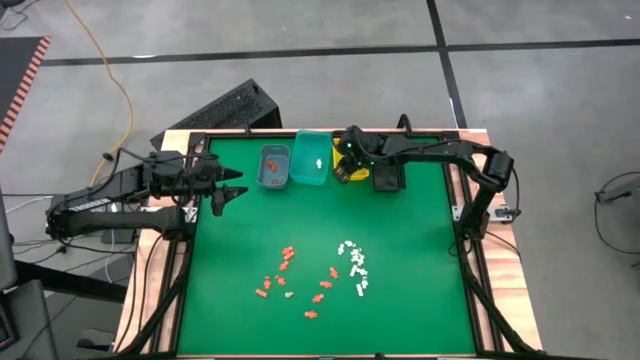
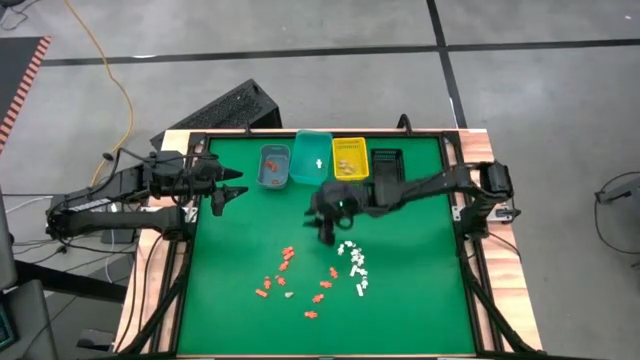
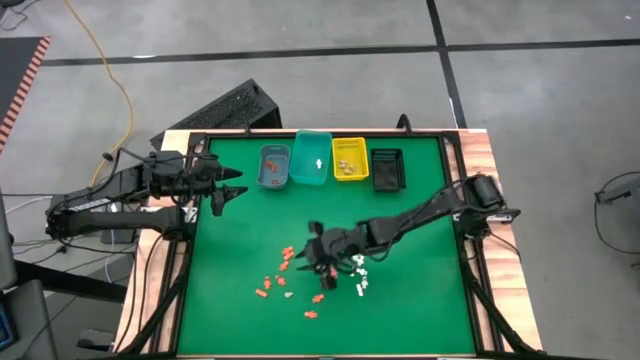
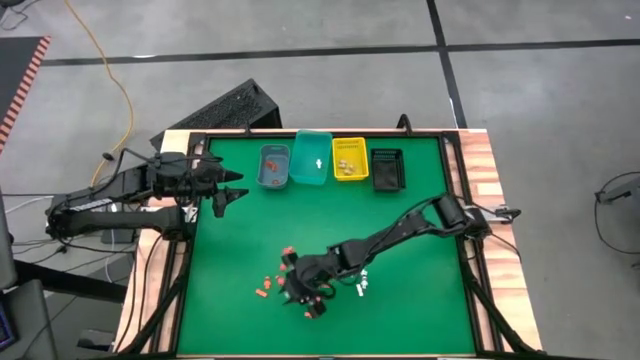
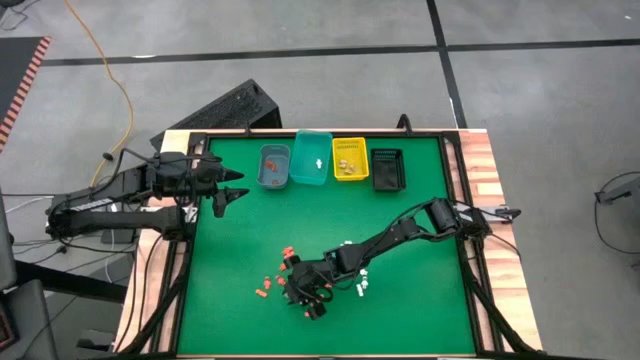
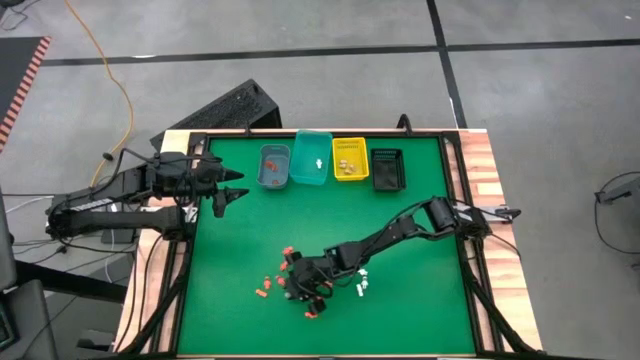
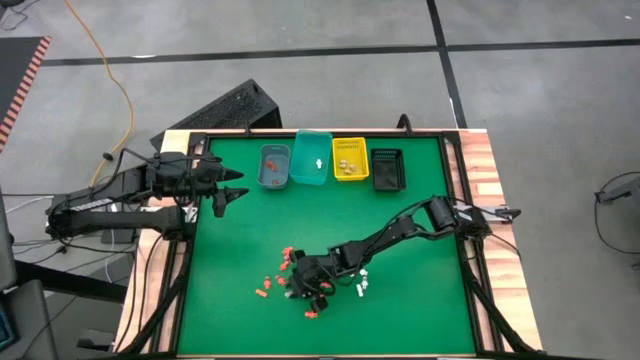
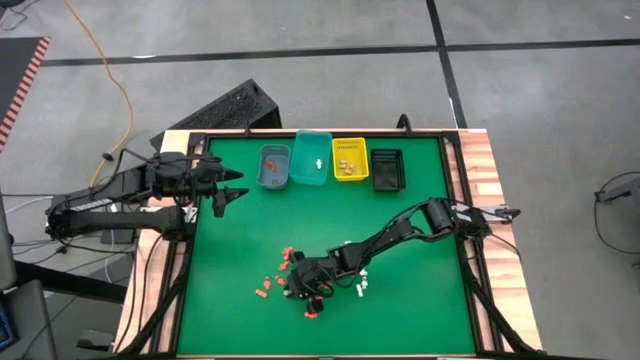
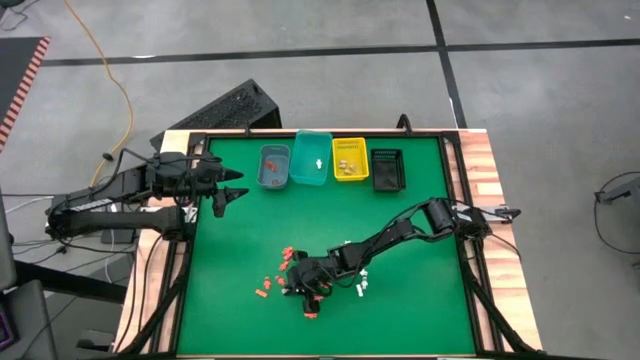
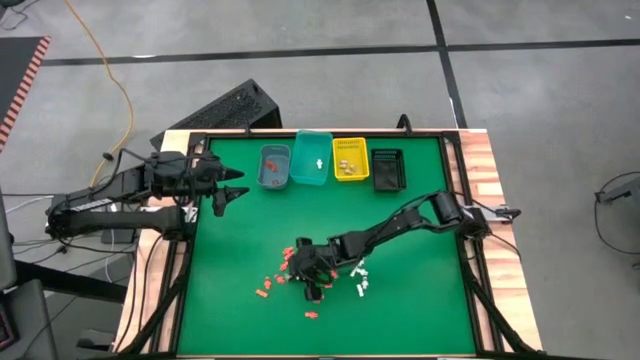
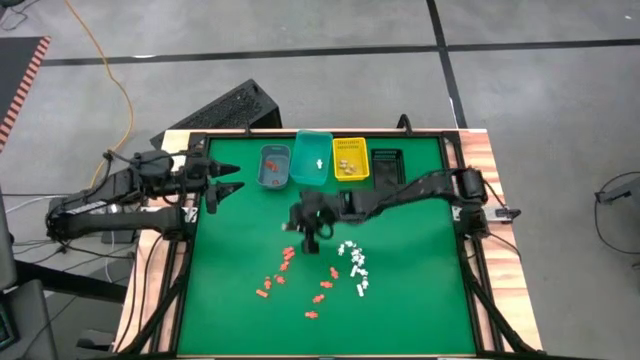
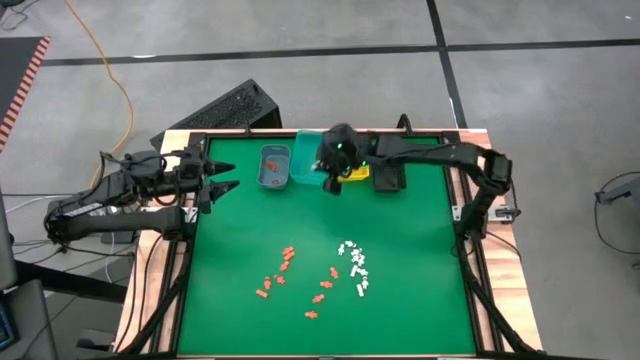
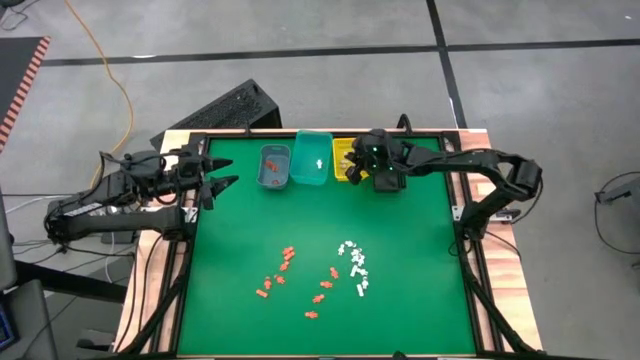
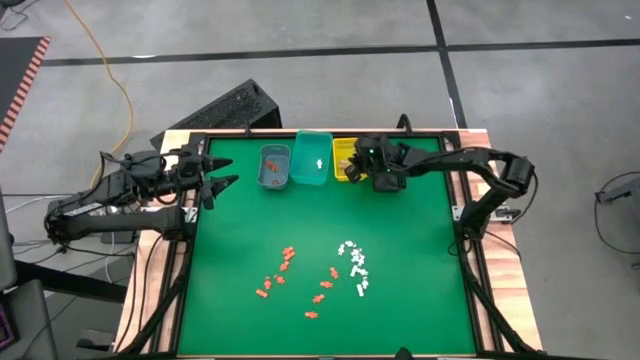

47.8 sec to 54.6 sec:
Task: Sort Halloween decoration
Put the white skull toy into the yellow bin

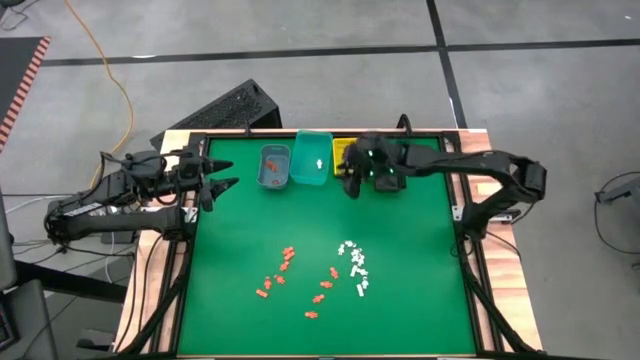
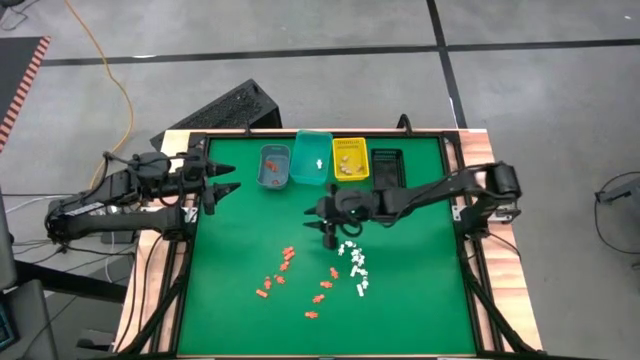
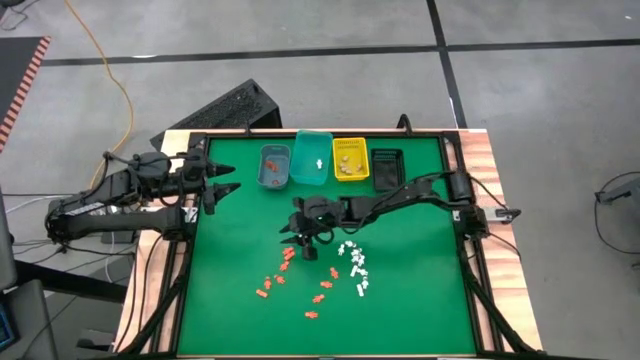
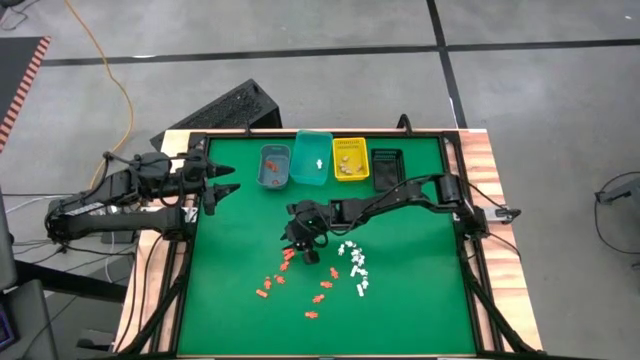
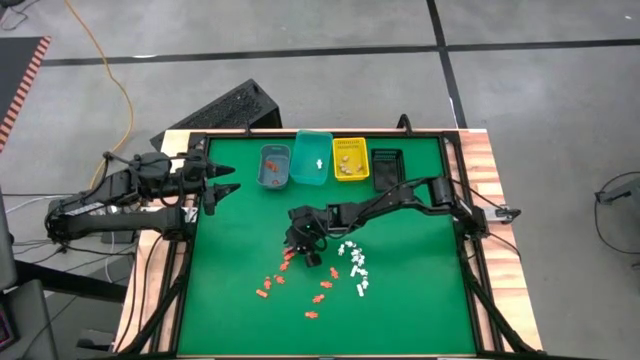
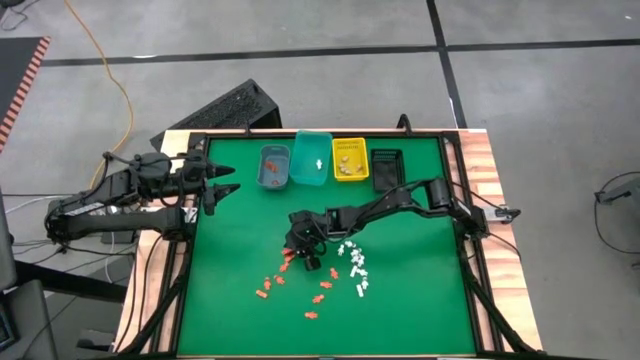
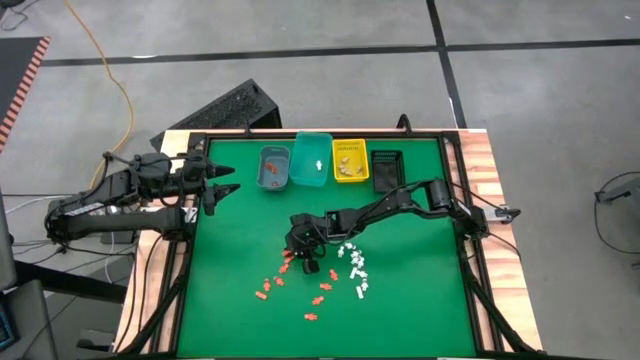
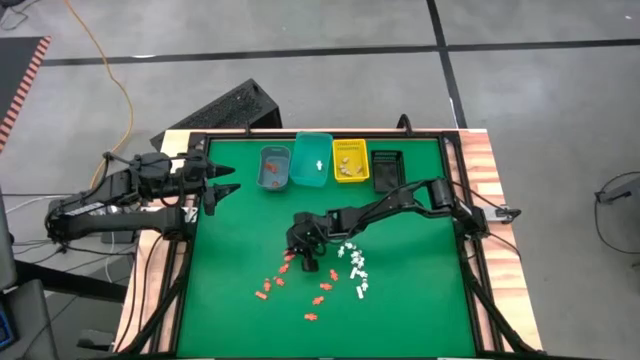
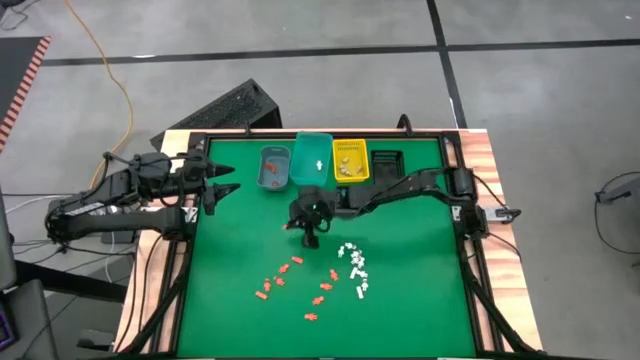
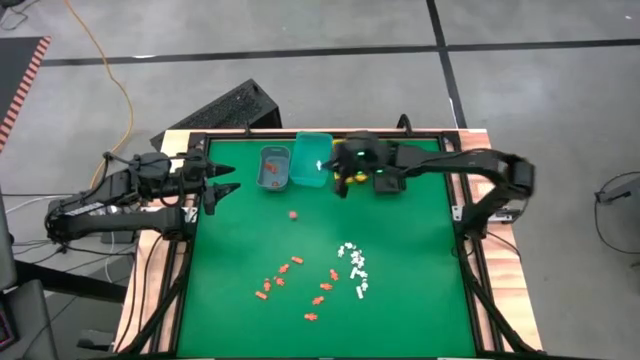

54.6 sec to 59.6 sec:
Put the orange skeleton toy into the black bin

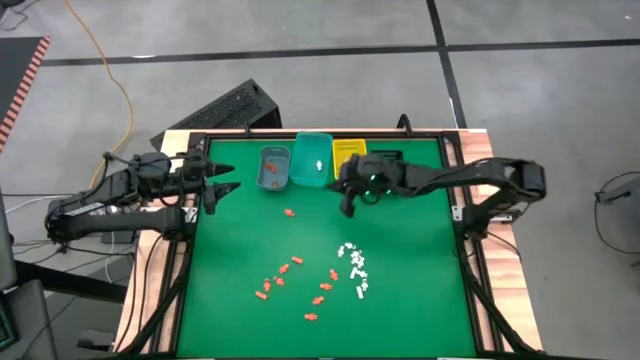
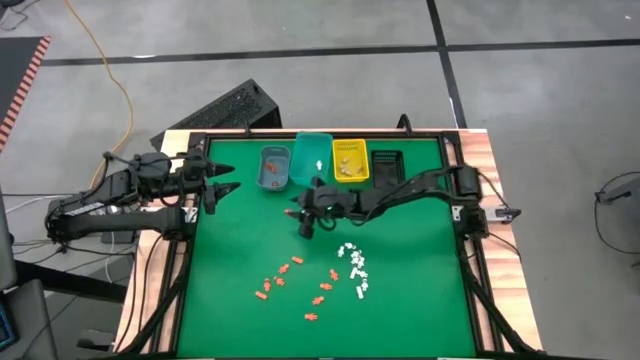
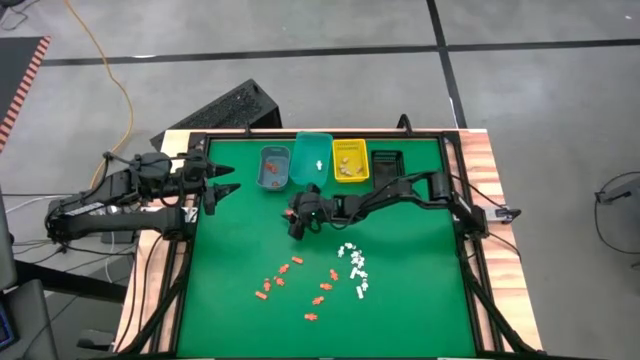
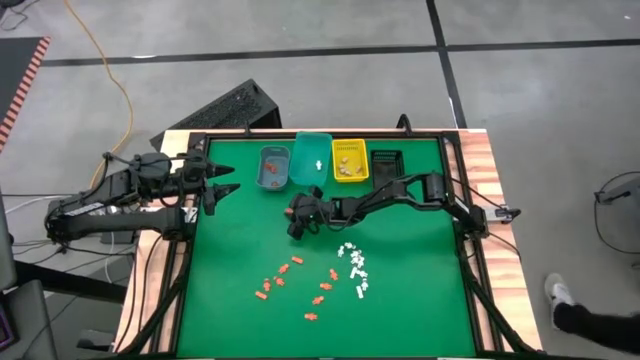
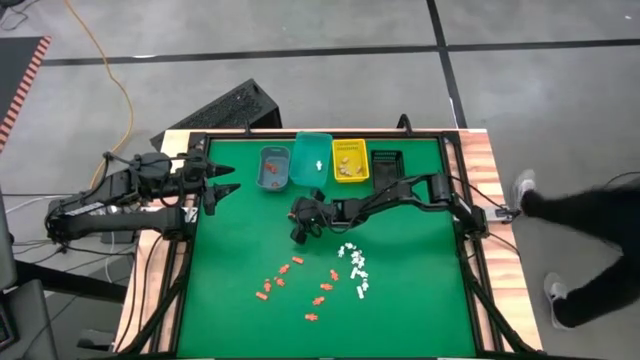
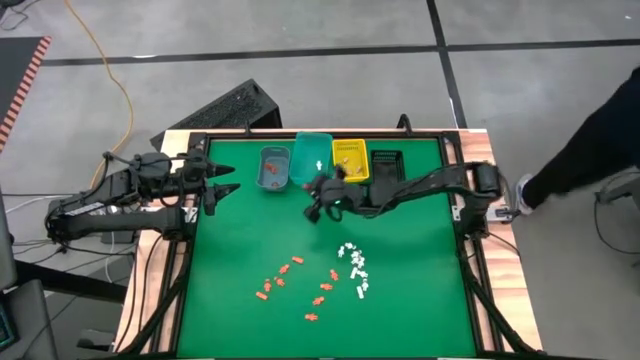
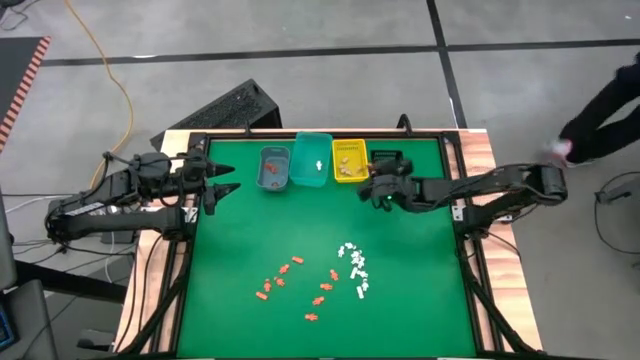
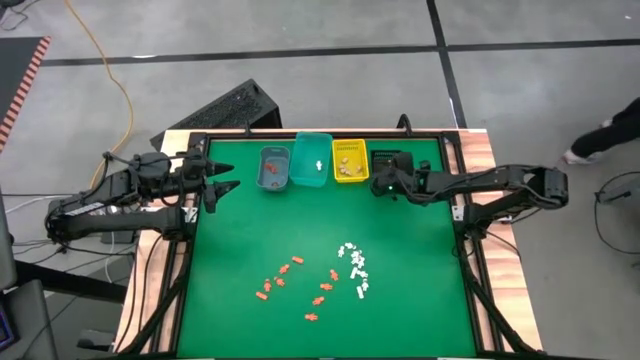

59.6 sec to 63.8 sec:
Put the orange skeleton toy into the black bin

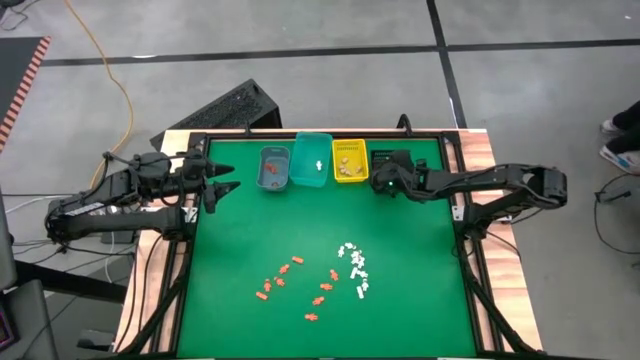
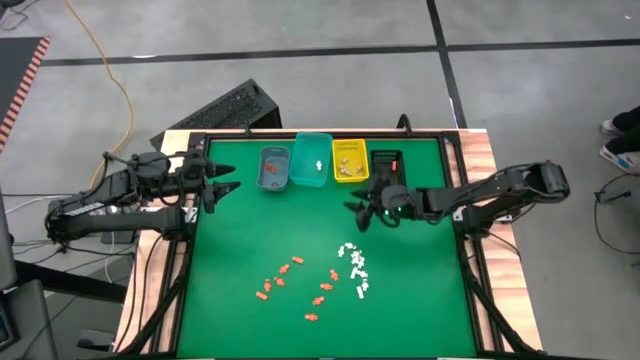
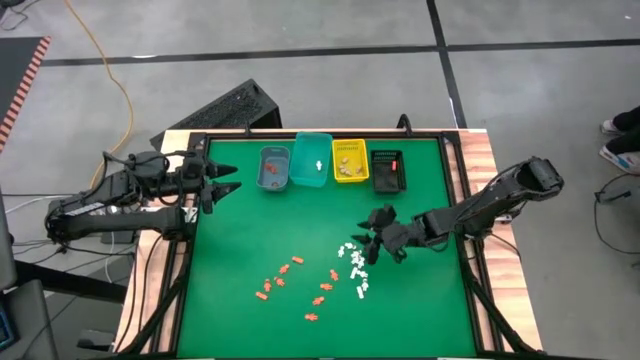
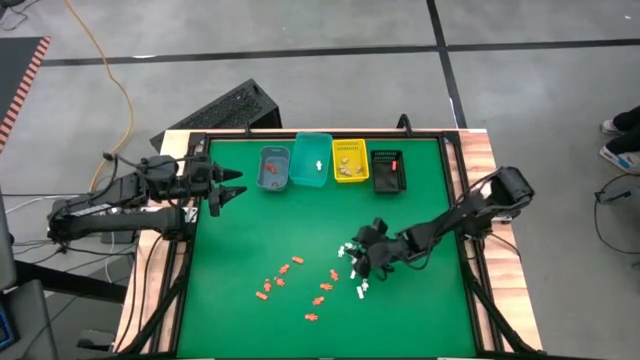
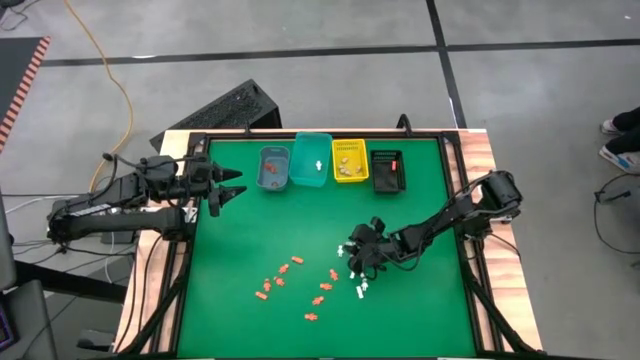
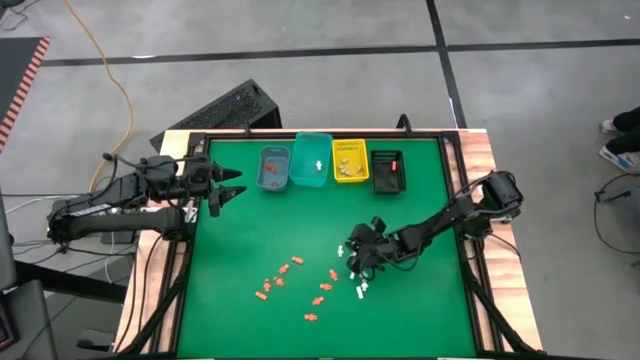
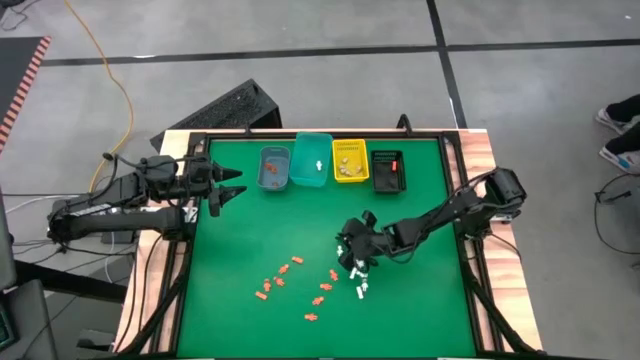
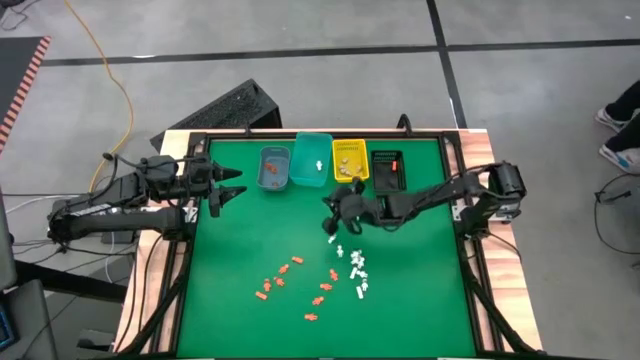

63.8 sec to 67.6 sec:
Put the white skeleton toy into the blue bin

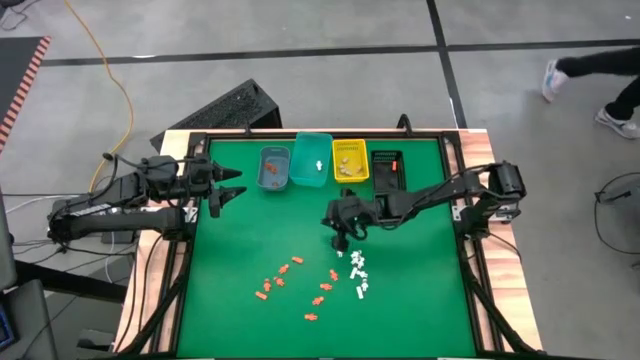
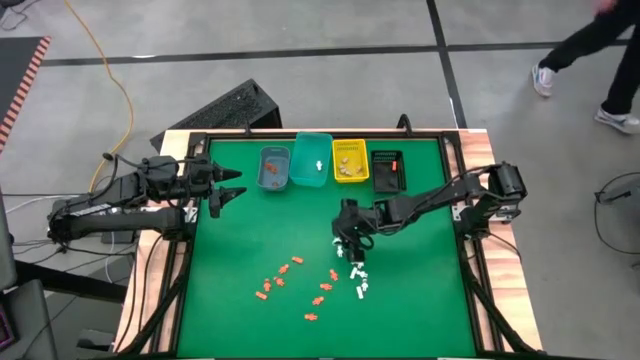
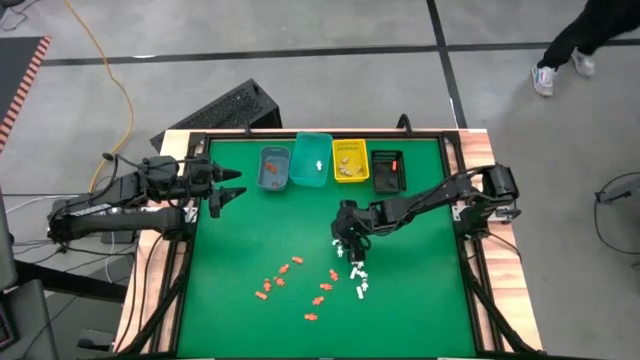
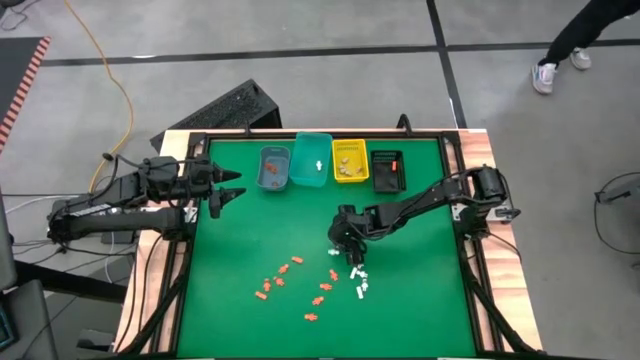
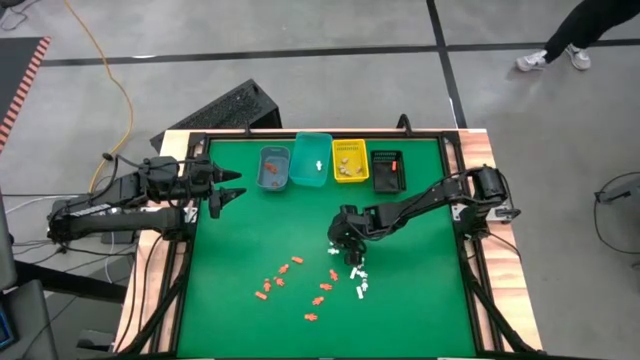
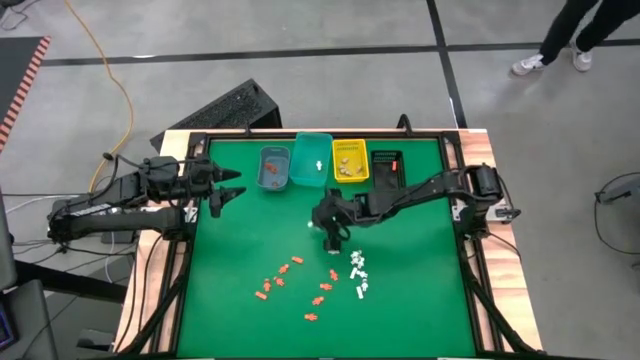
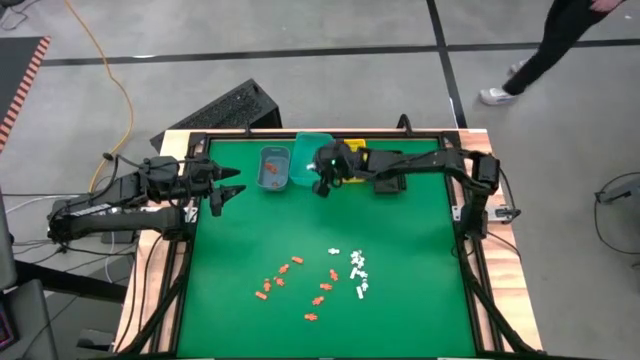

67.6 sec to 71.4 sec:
Put the white skeleton toy into the blue transparent bin
